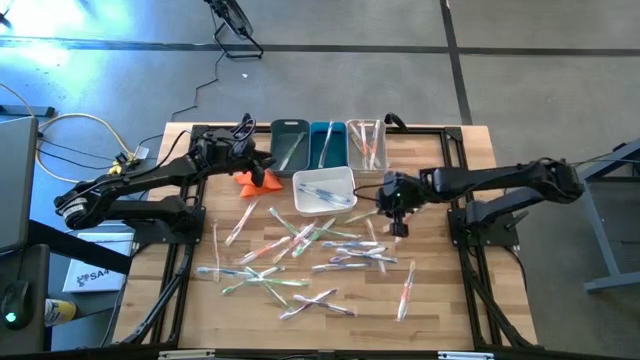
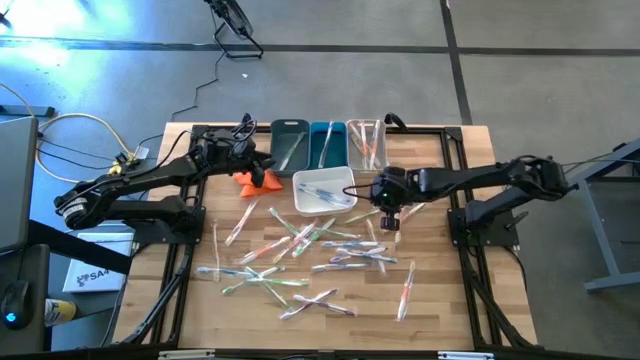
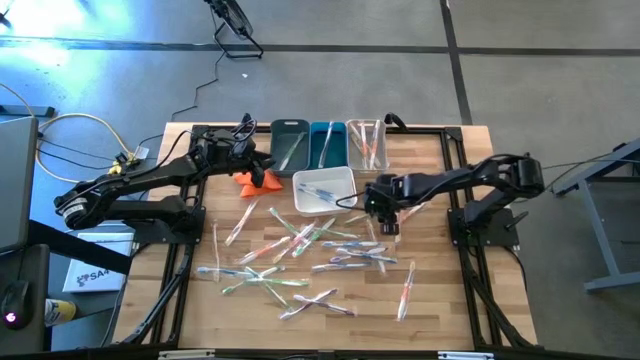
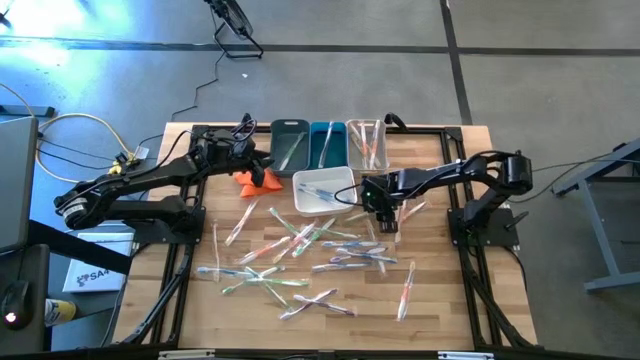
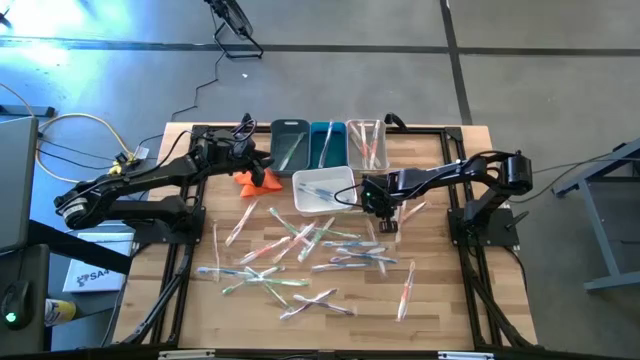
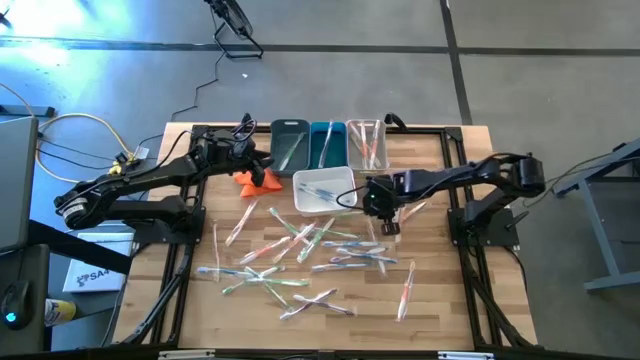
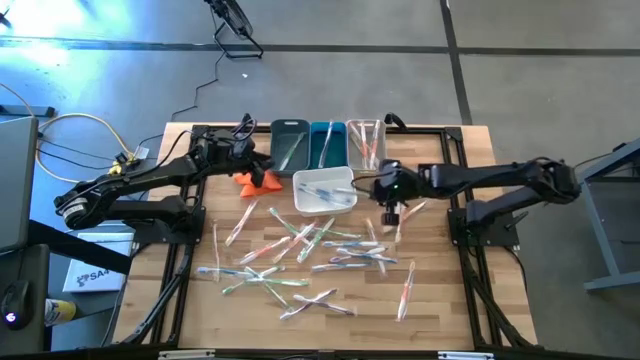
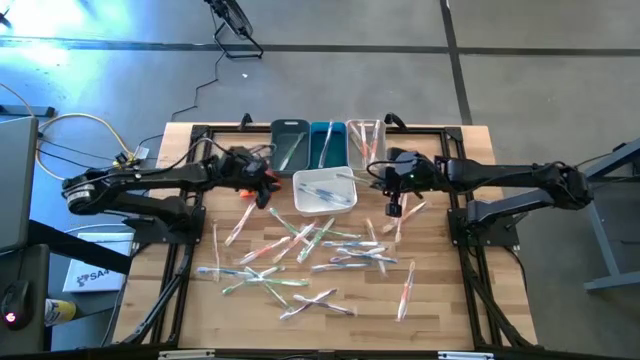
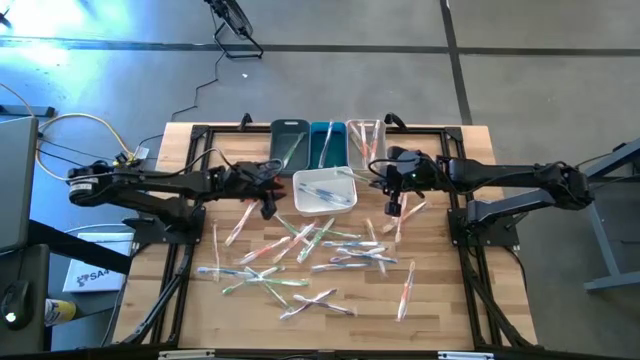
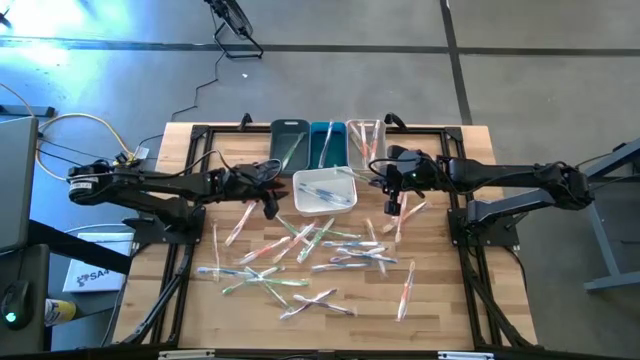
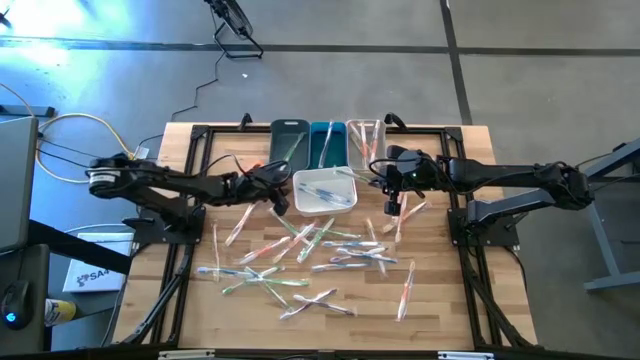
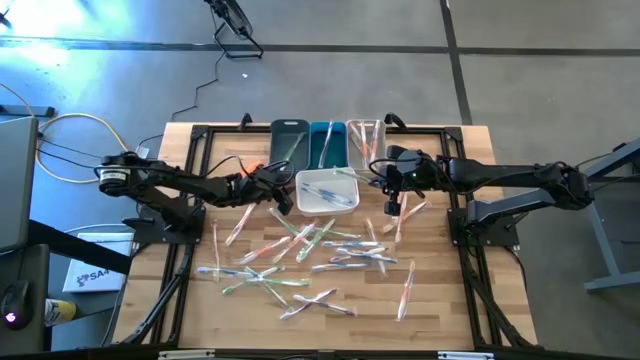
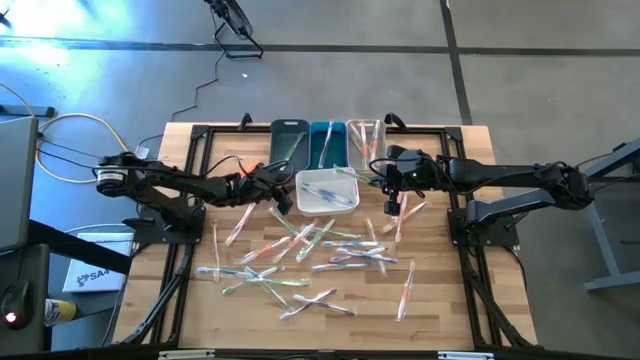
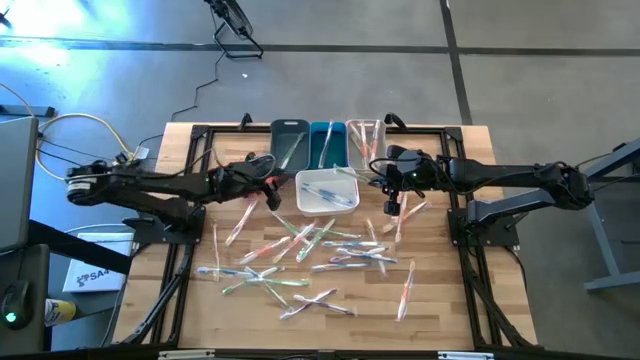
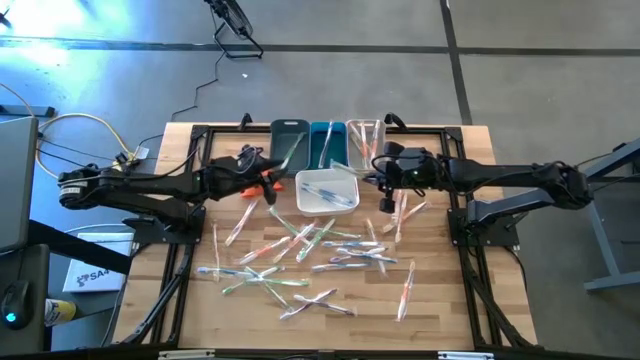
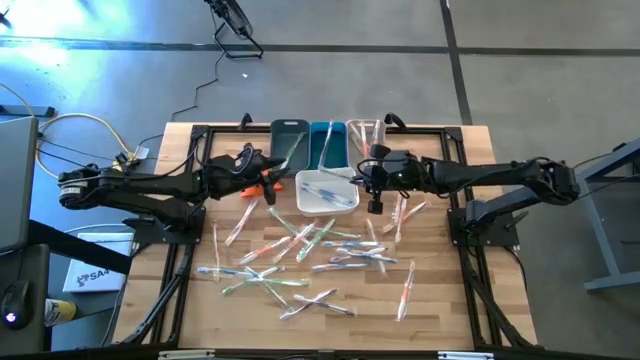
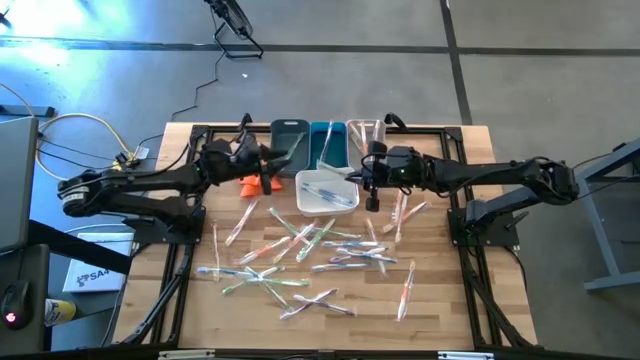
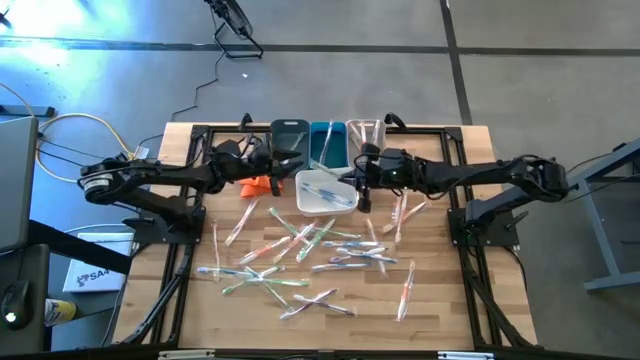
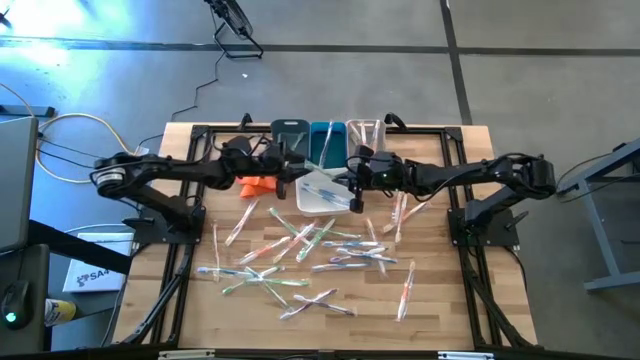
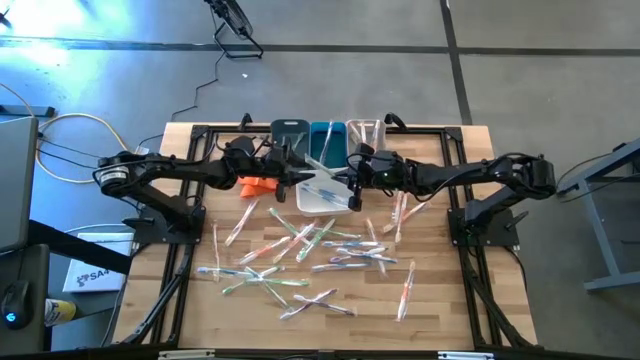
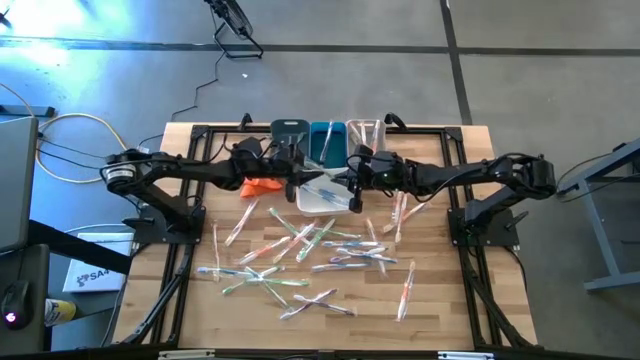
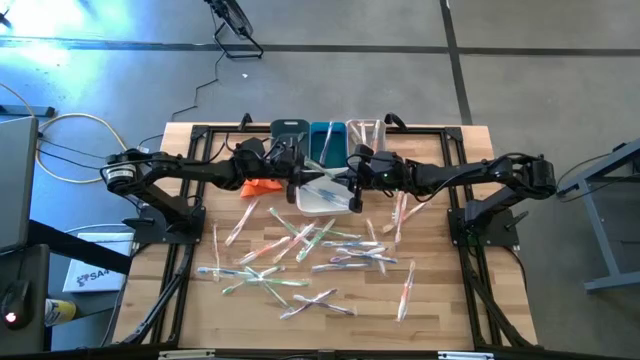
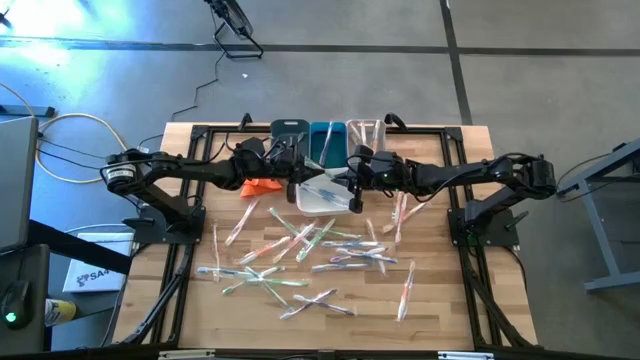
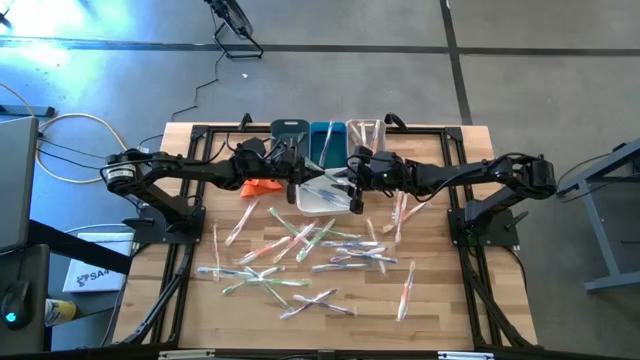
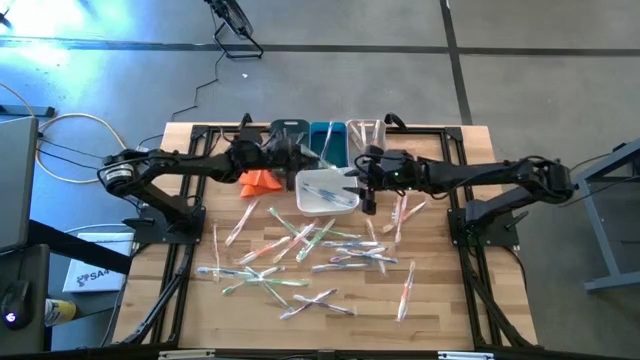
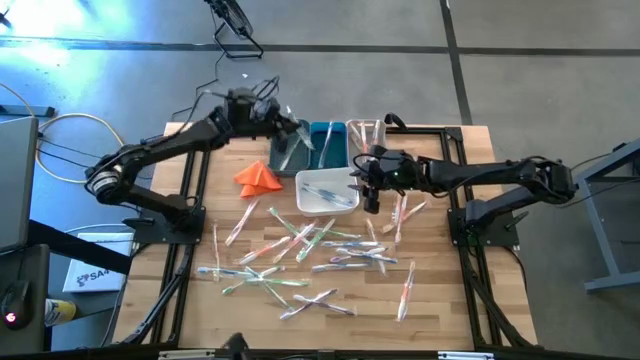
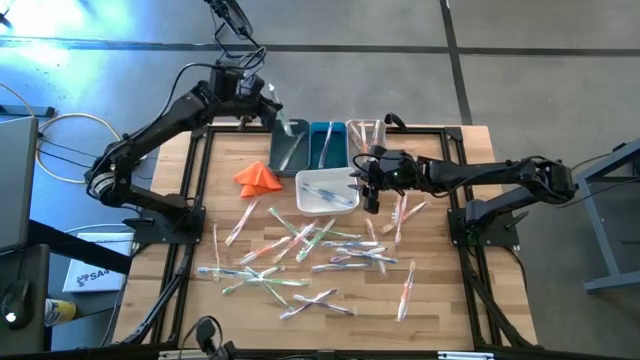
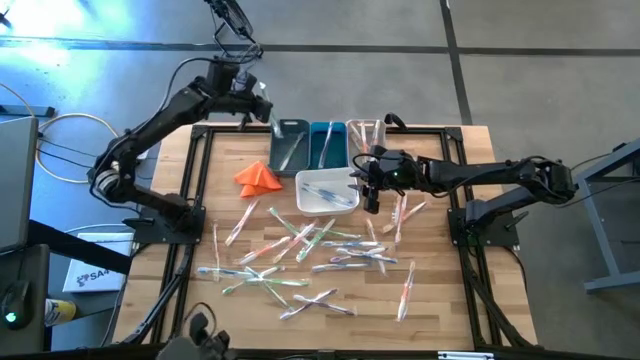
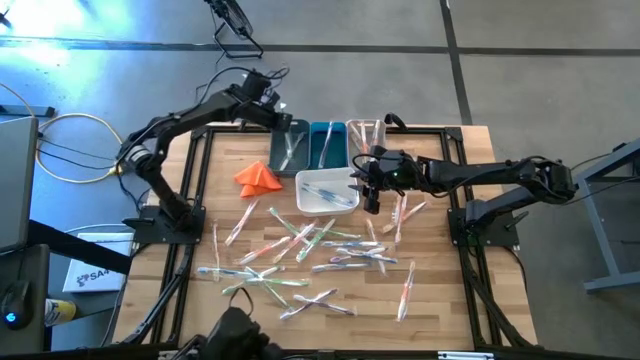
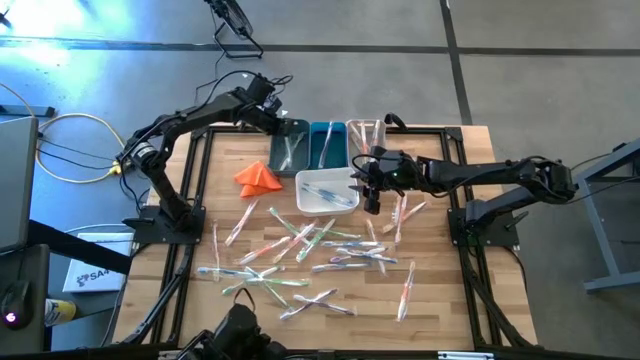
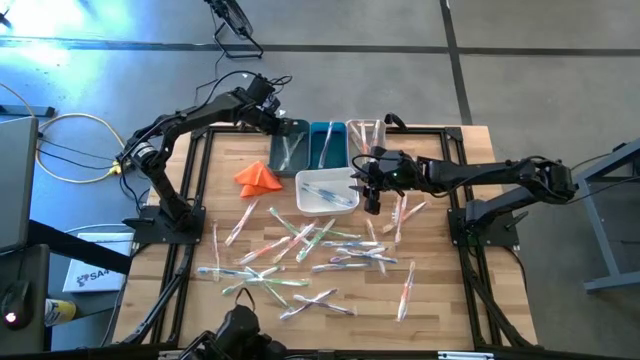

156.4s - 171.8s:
Task: Pick & Place Toothbrushes
Put the green toothbrush into the dark blue bin

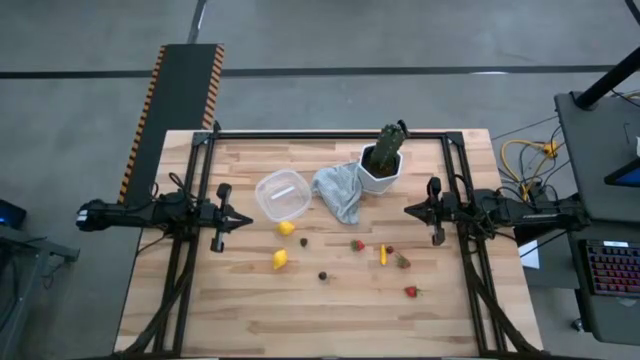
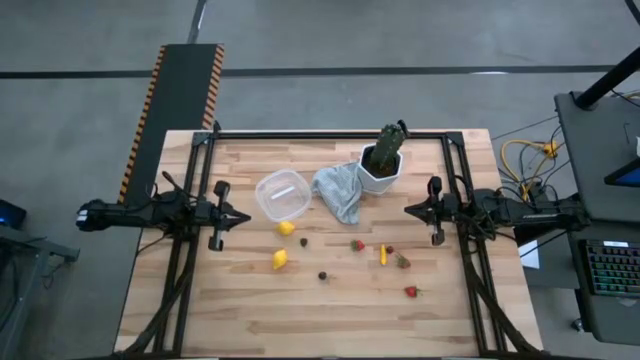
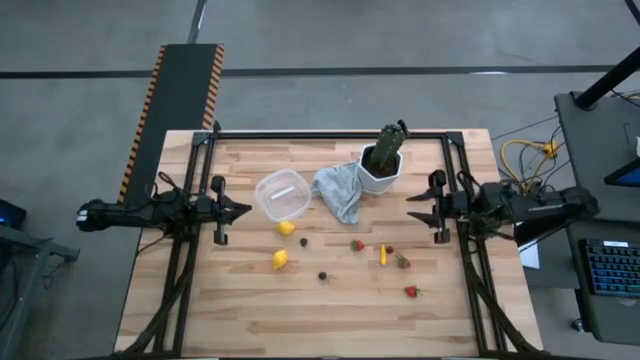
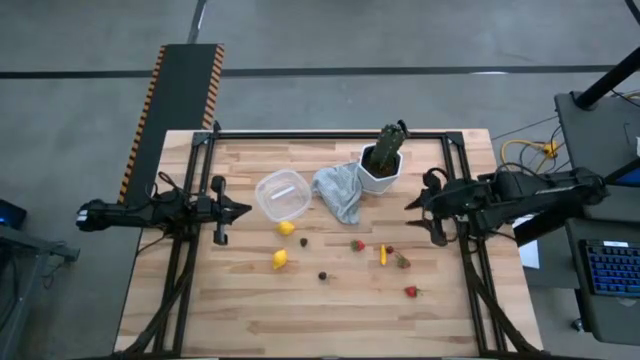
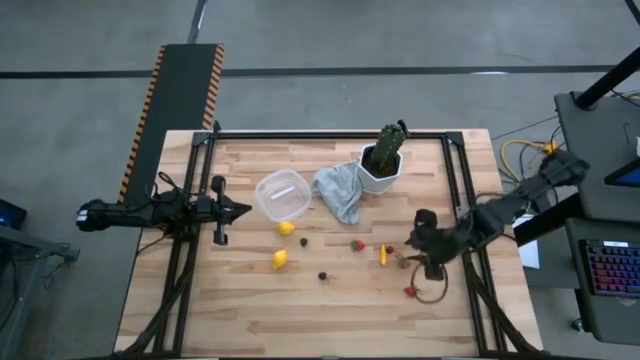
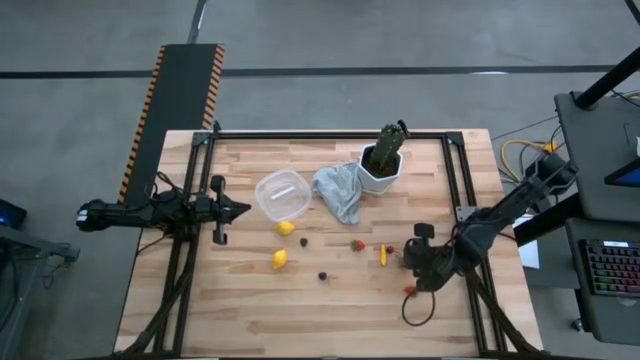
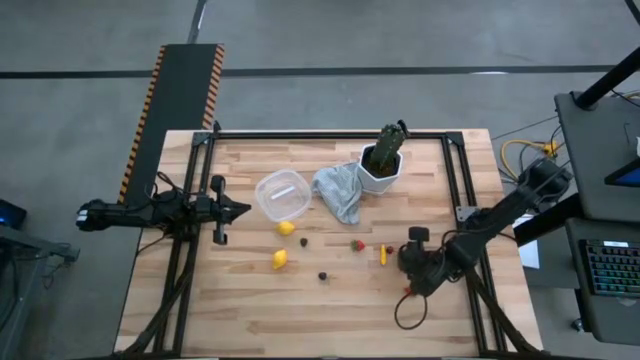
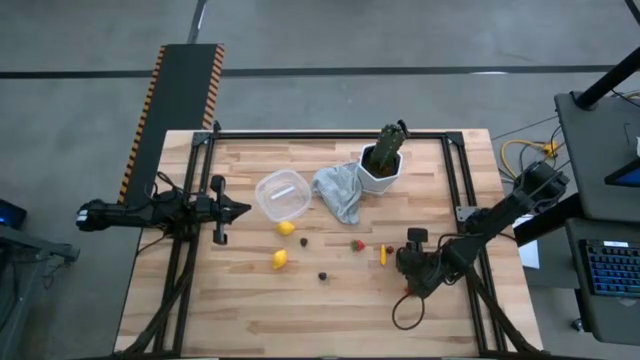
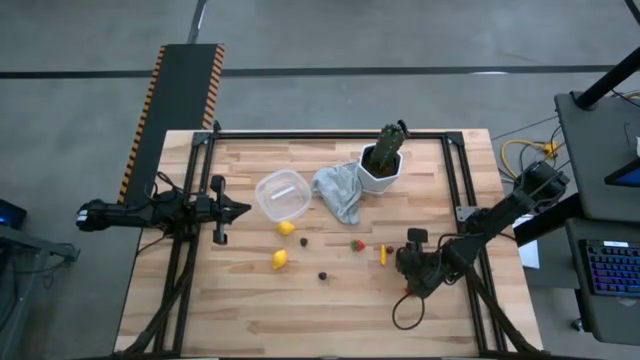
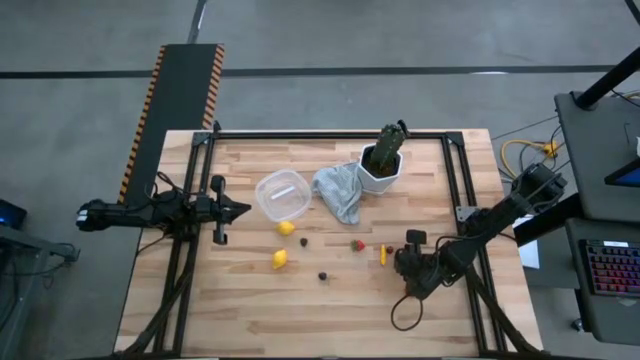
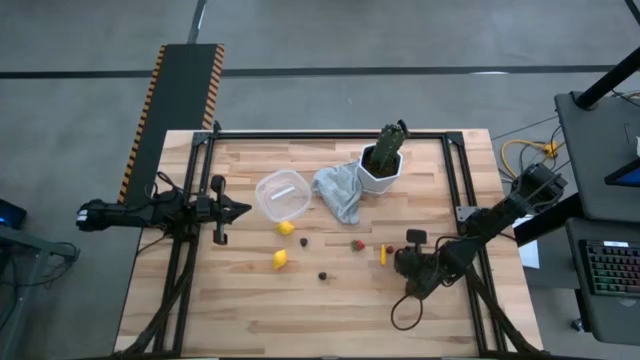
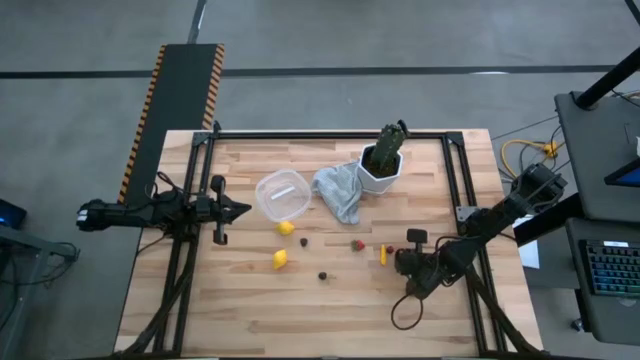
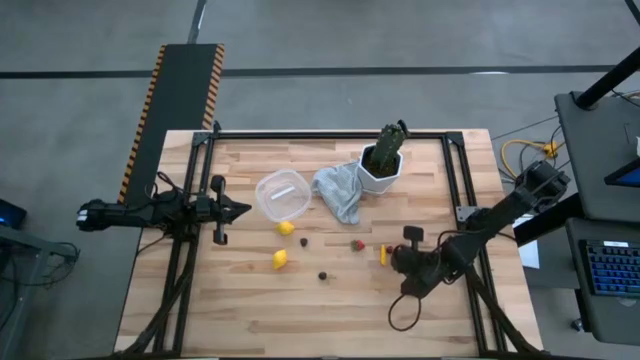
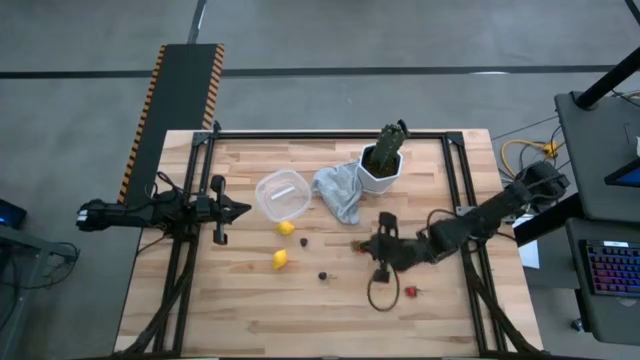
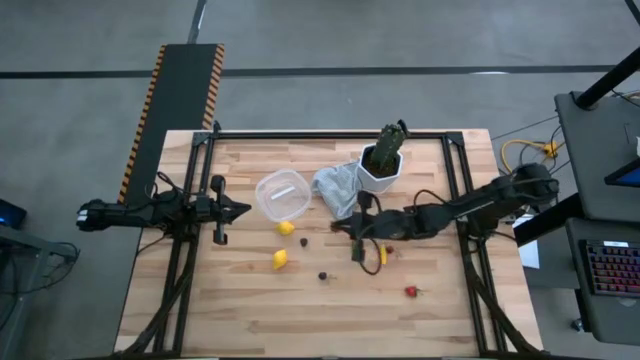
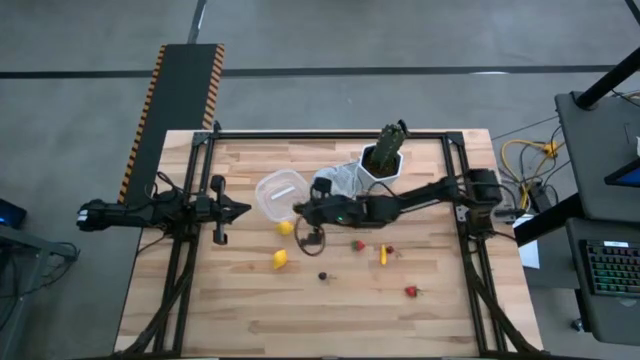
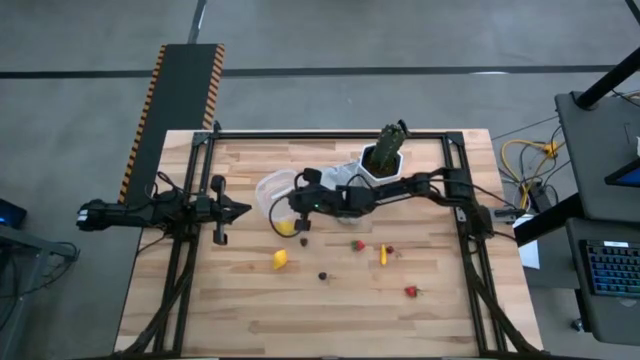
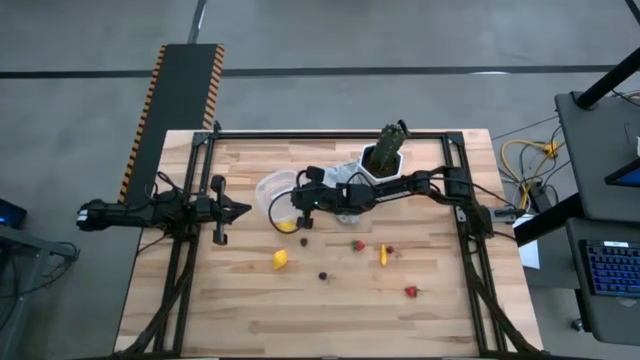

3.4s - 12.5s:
Task: Pick and placing Produce into tupperware
Put the middle red strawberry into the transparent container
